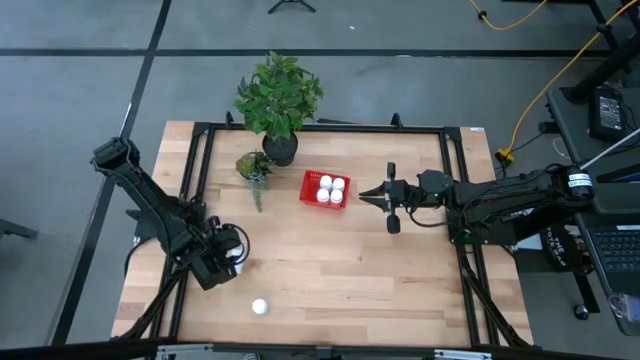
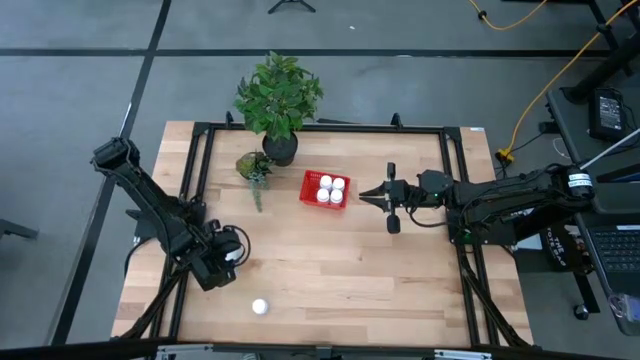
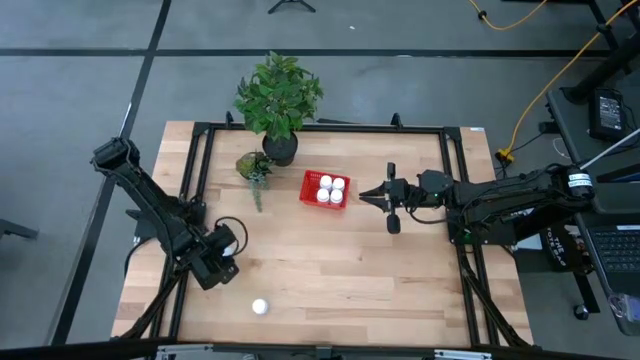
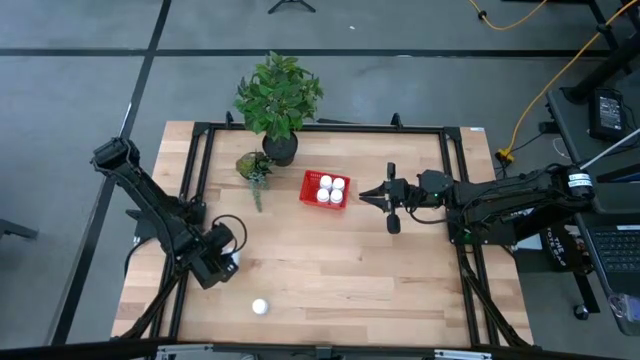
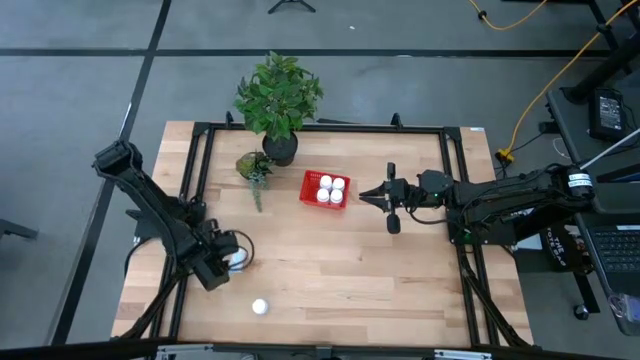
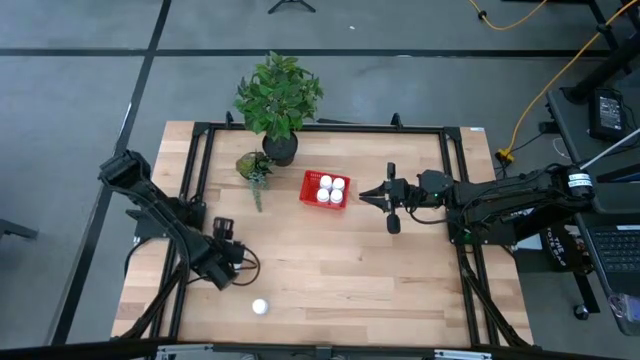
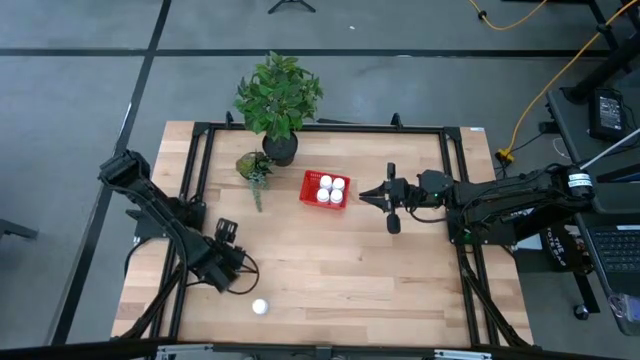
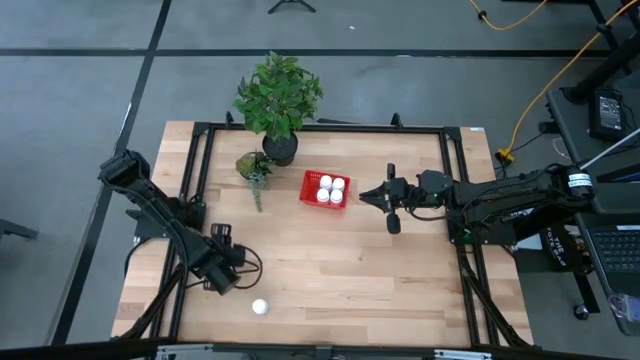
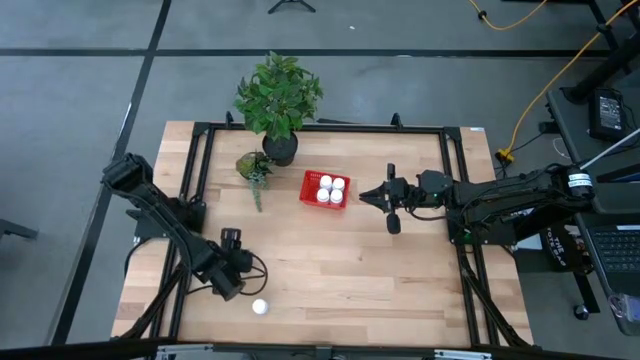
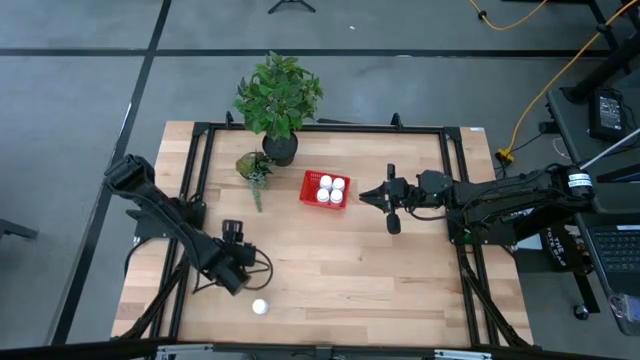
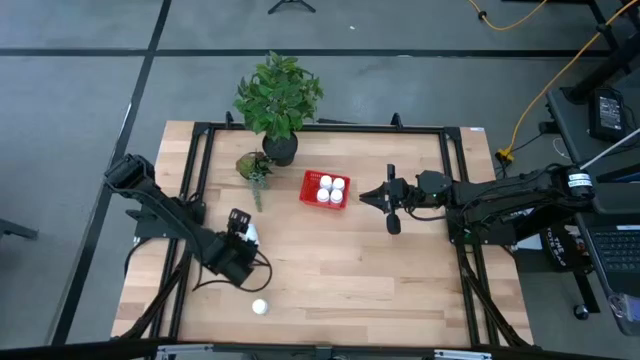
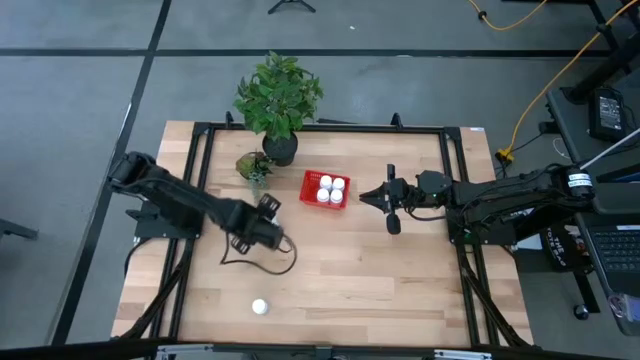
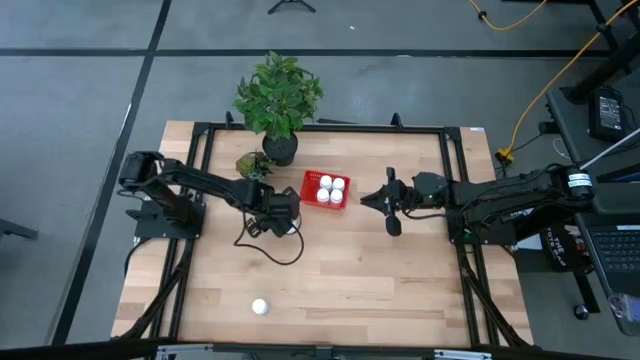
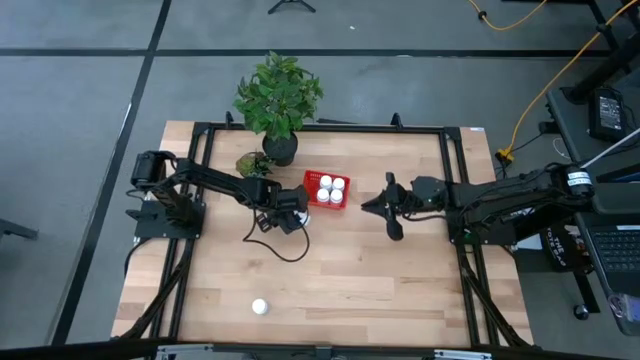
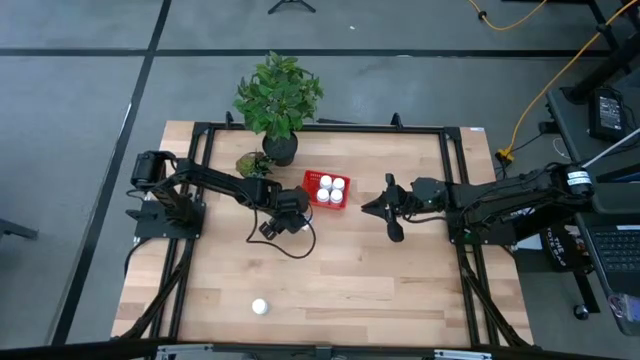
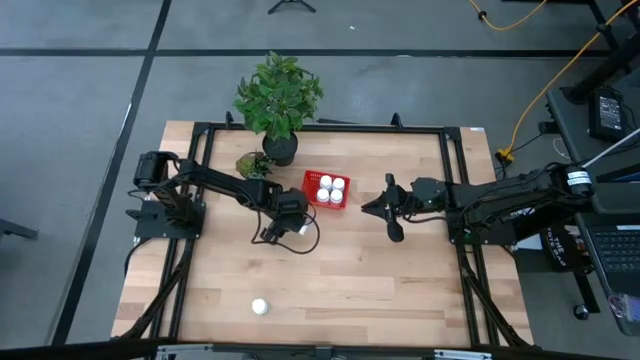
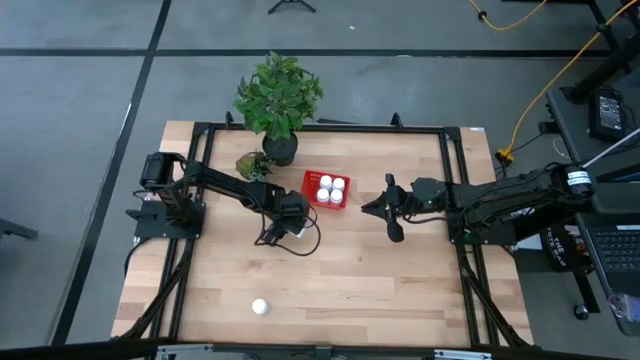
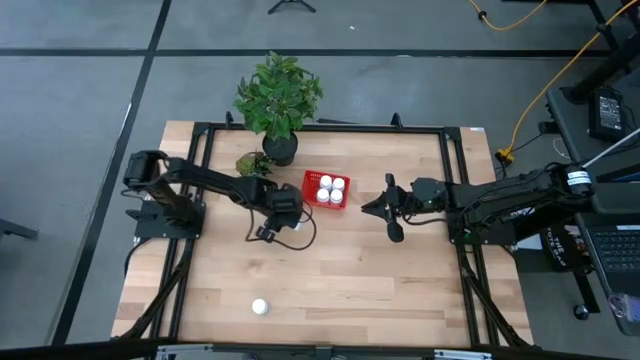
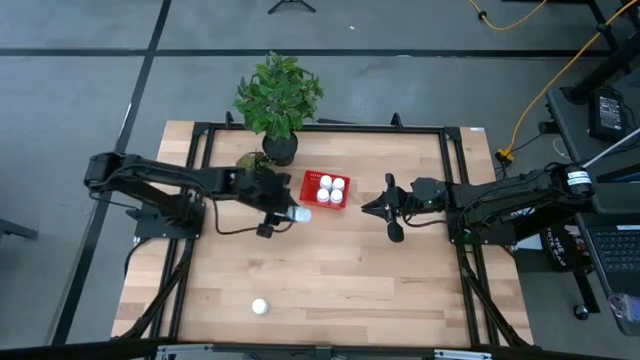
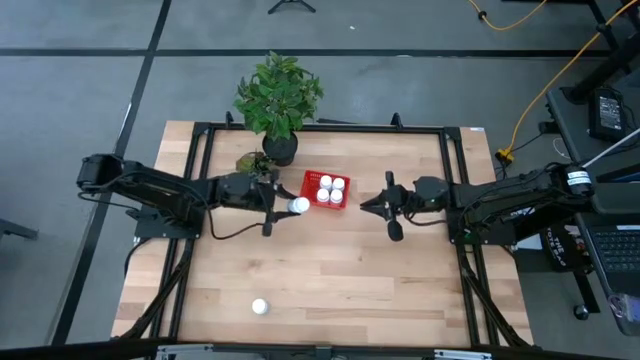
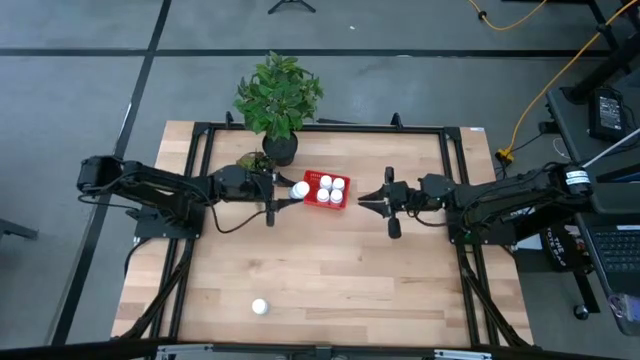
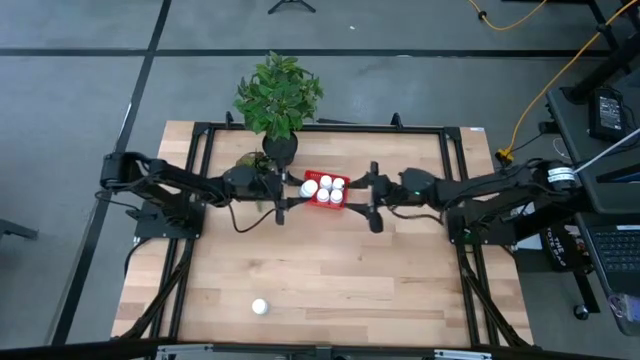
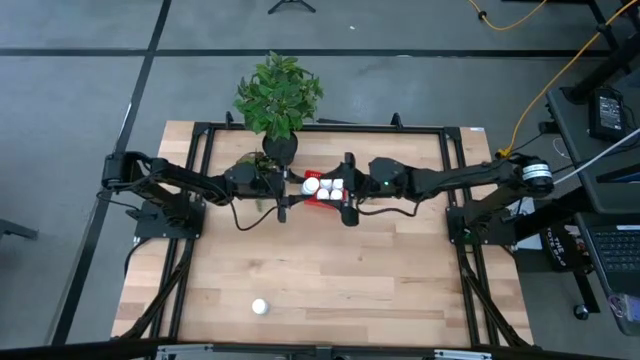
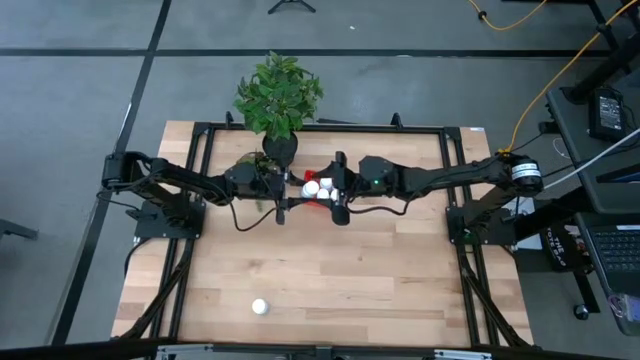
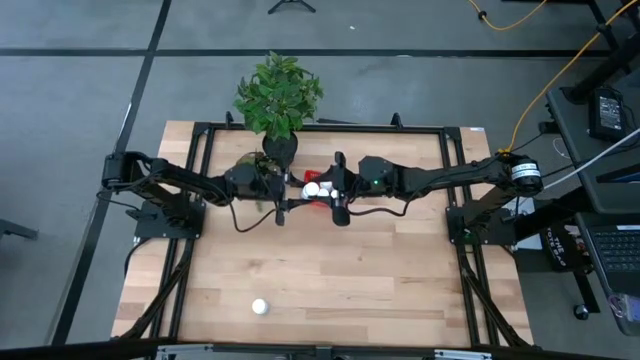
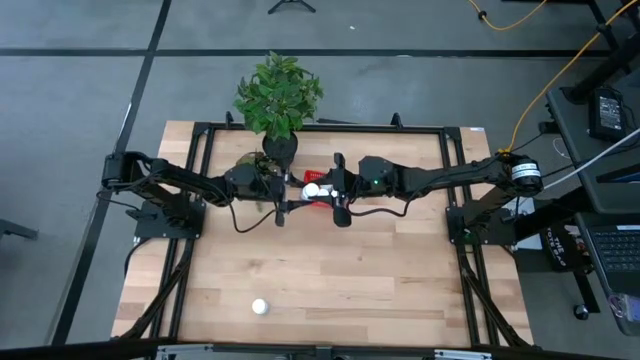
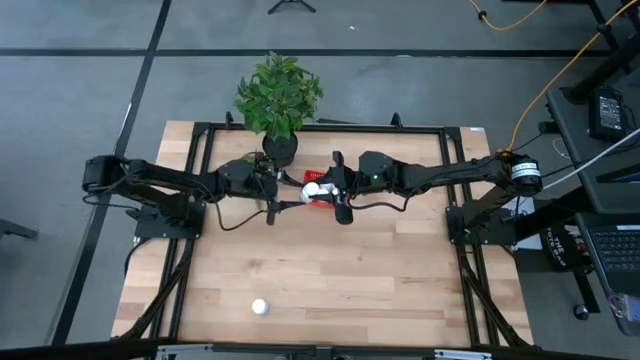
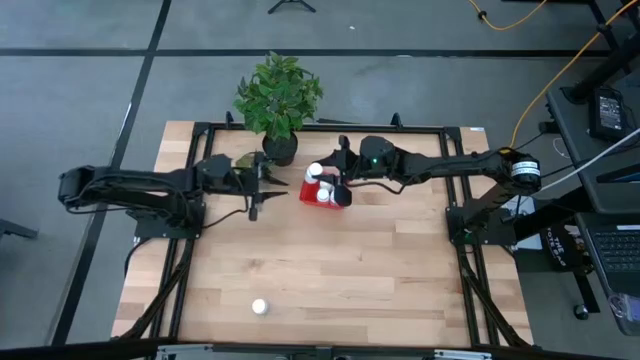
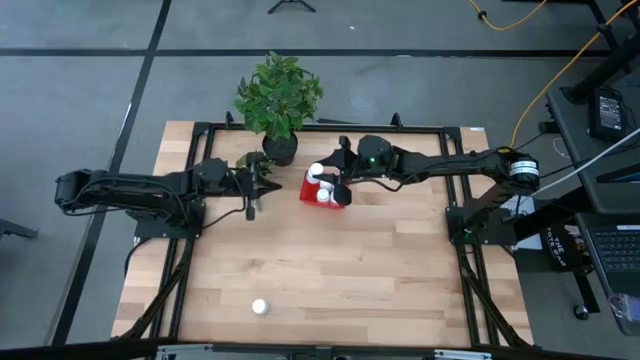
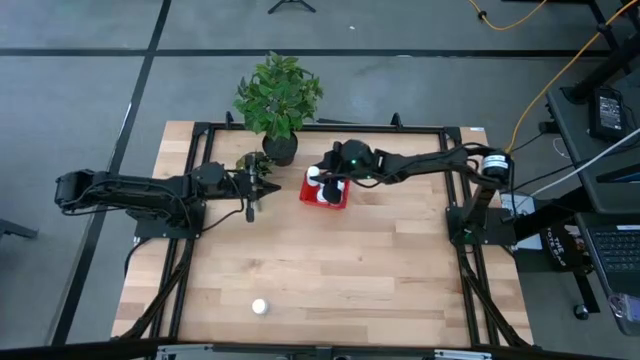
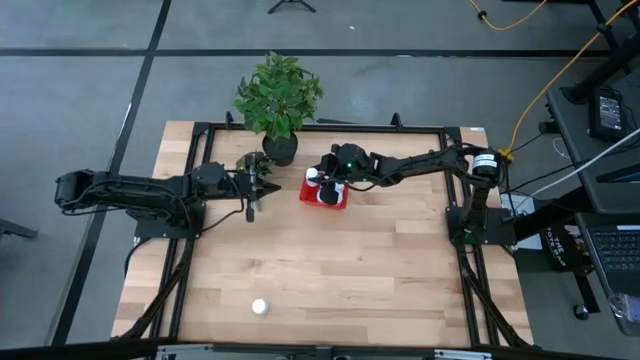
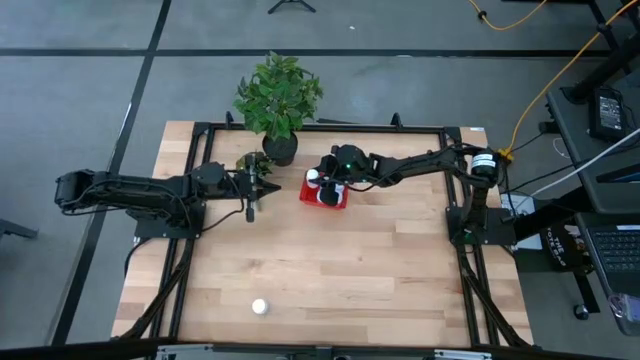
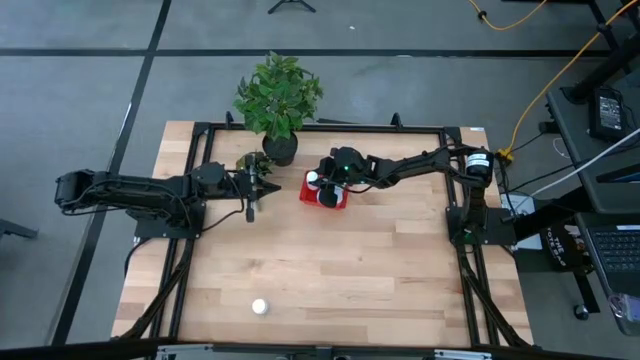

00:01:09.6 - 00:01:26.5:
Task: Pick and place pill bottles into a basket
Put the white medicine bottle into the red bin

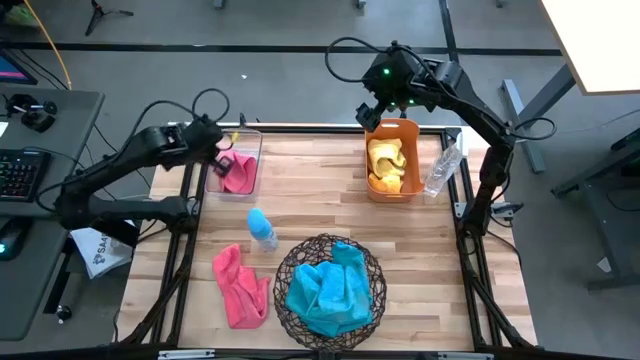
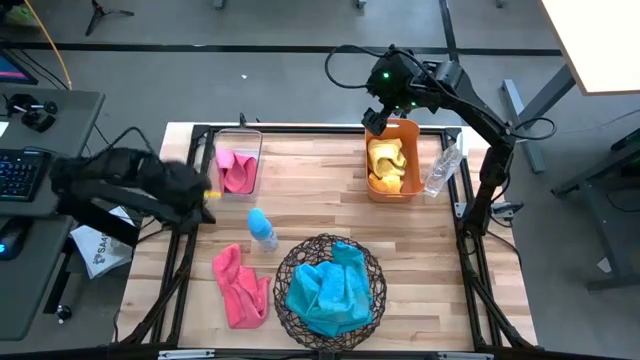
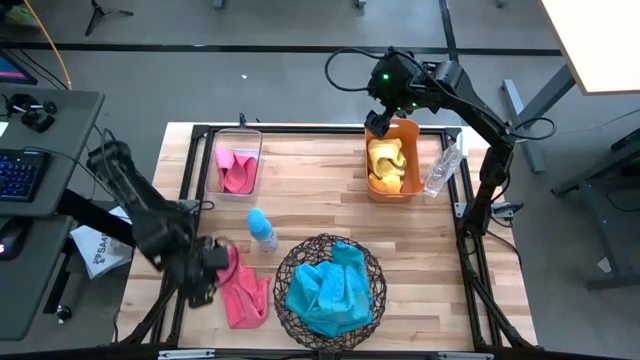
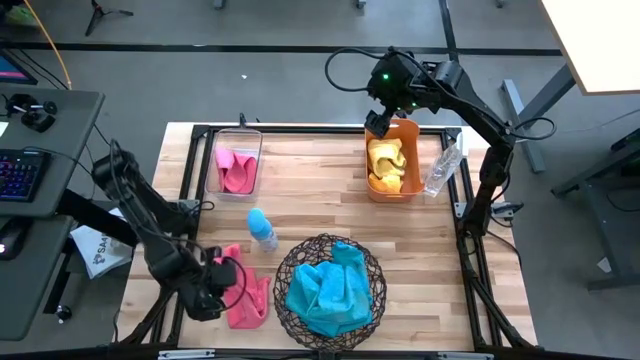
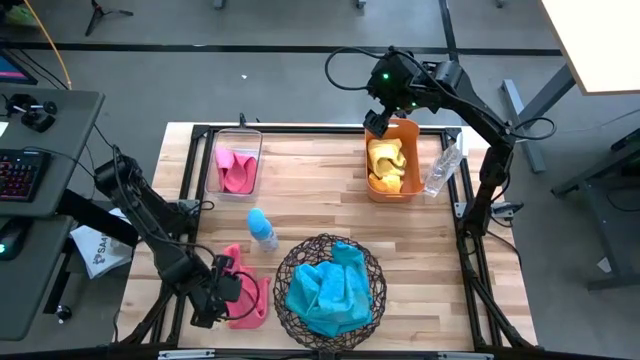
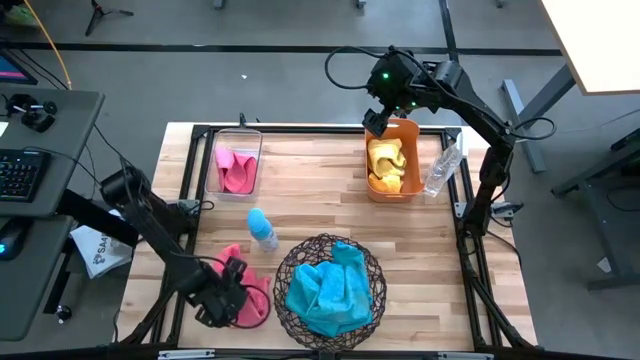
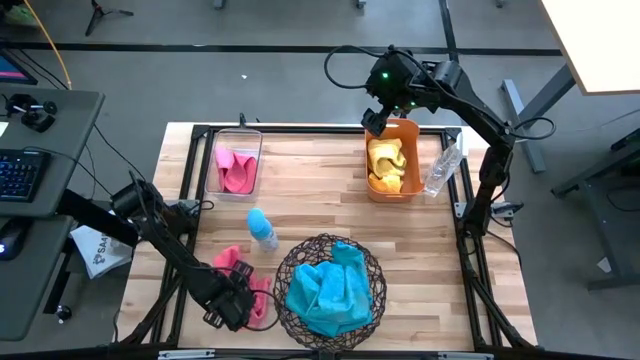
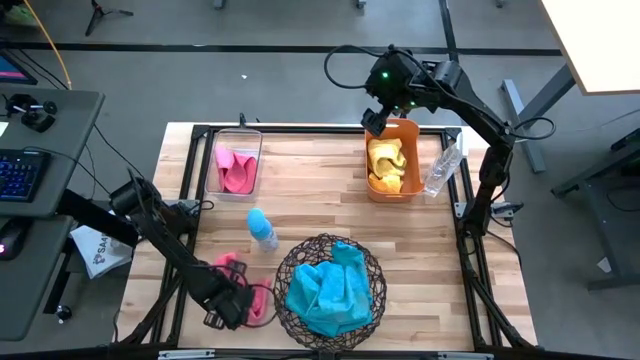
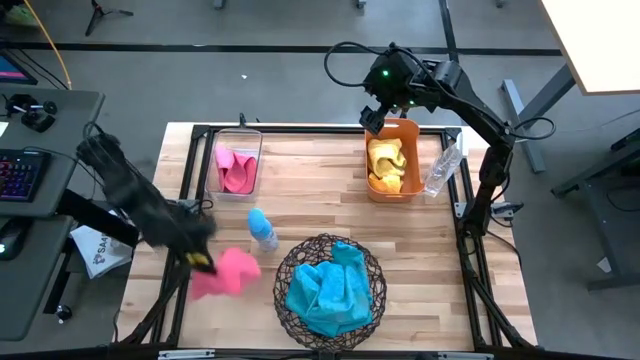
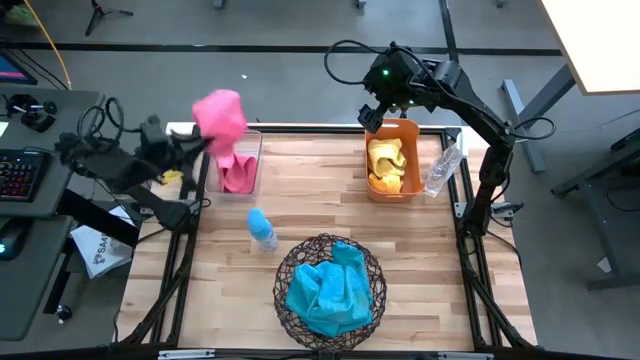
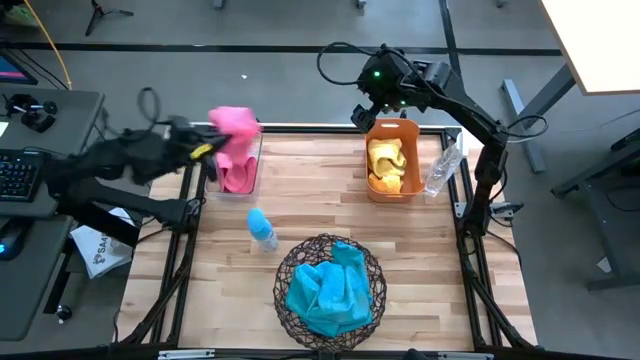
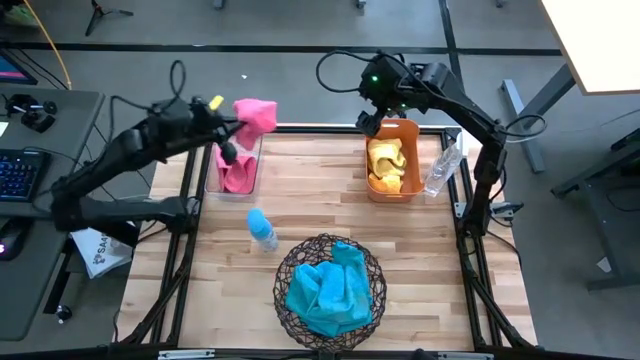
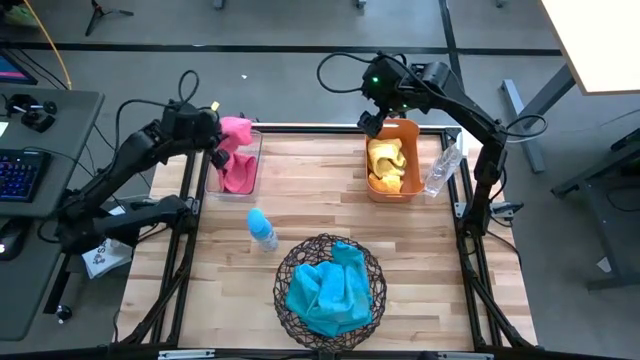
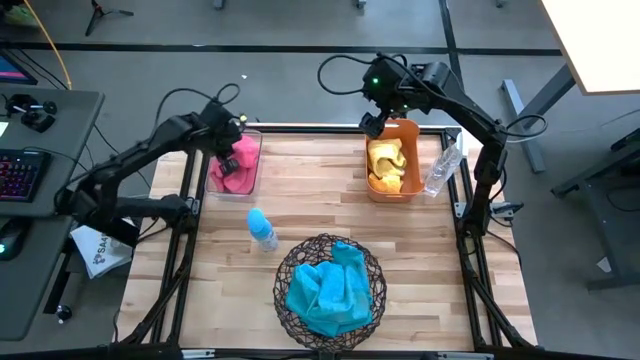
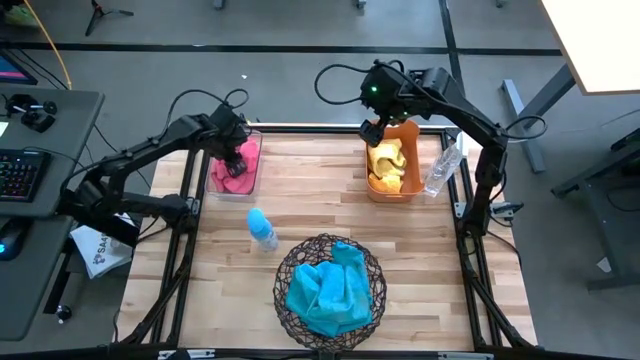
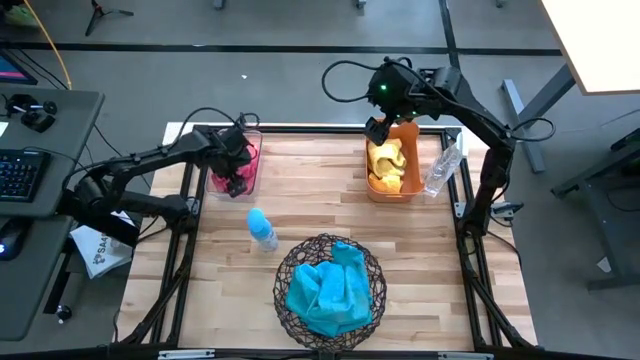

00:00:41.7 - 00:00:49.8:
Task: Sort microfiber towel by color & place in baskets
Put the pink towel into the transparent bin
